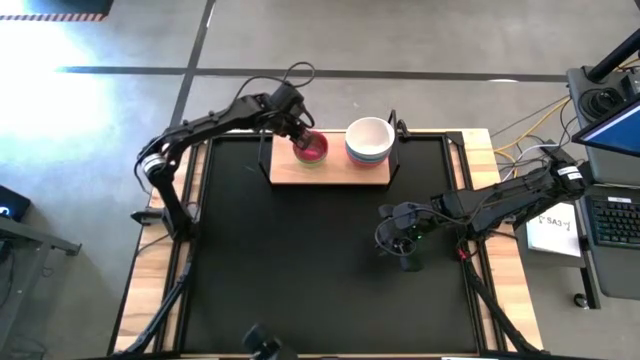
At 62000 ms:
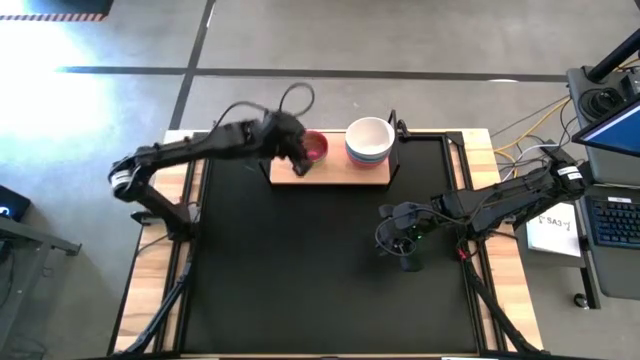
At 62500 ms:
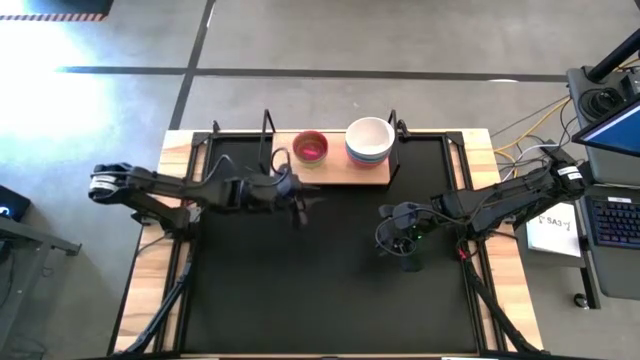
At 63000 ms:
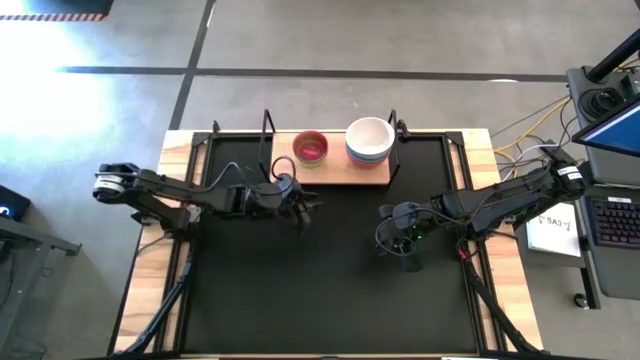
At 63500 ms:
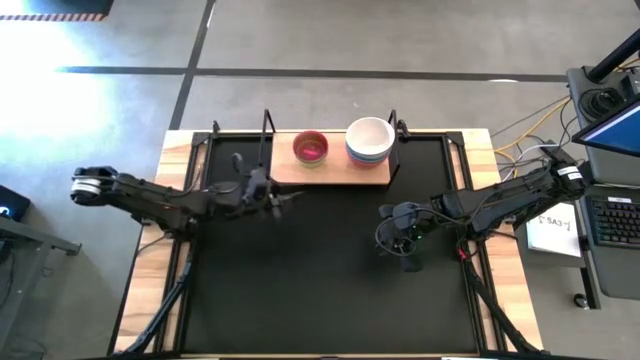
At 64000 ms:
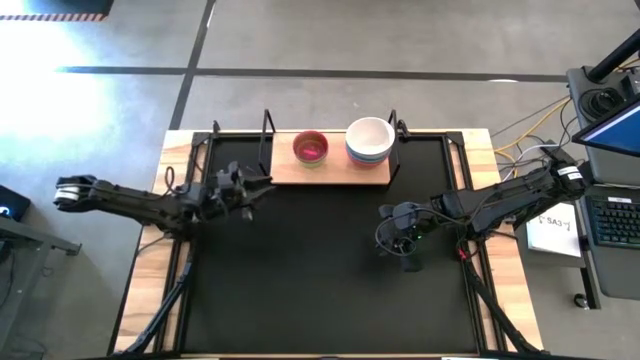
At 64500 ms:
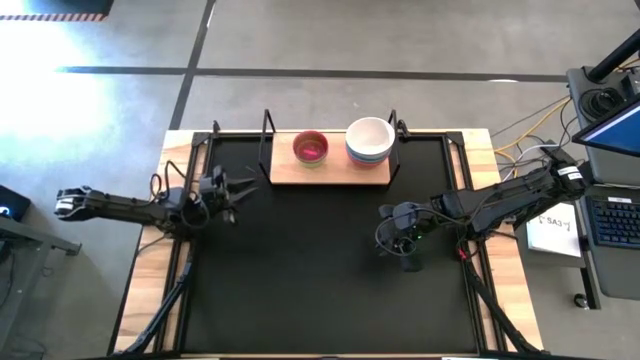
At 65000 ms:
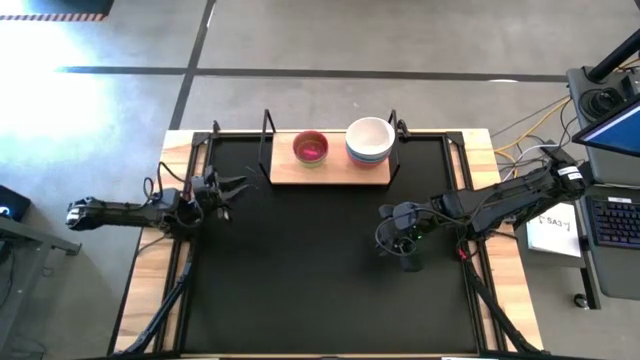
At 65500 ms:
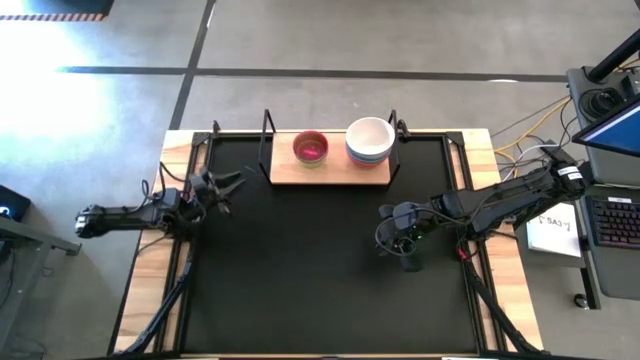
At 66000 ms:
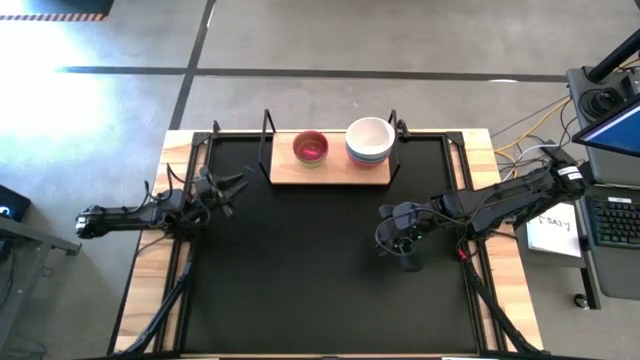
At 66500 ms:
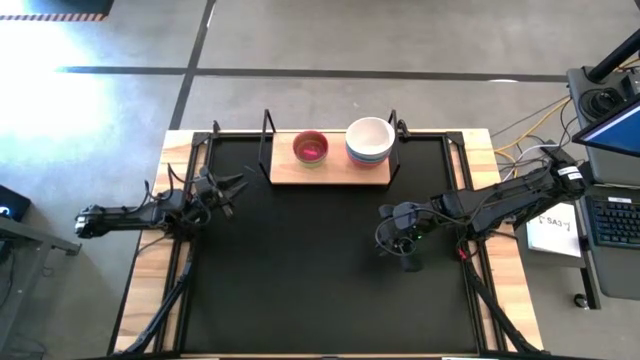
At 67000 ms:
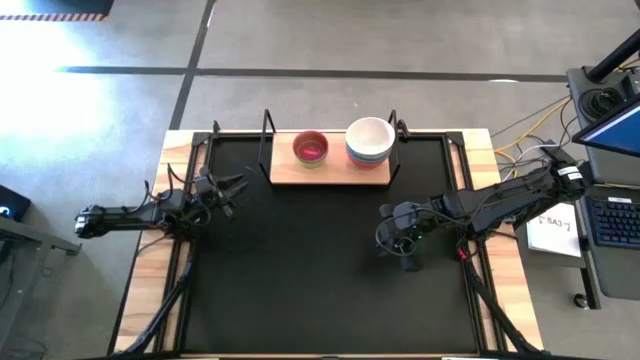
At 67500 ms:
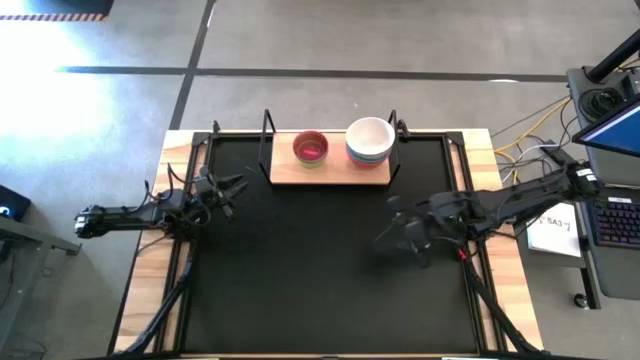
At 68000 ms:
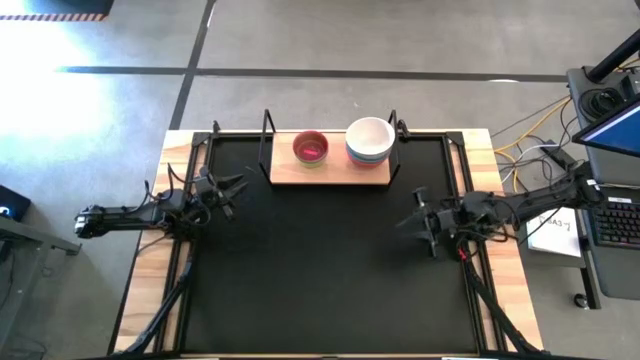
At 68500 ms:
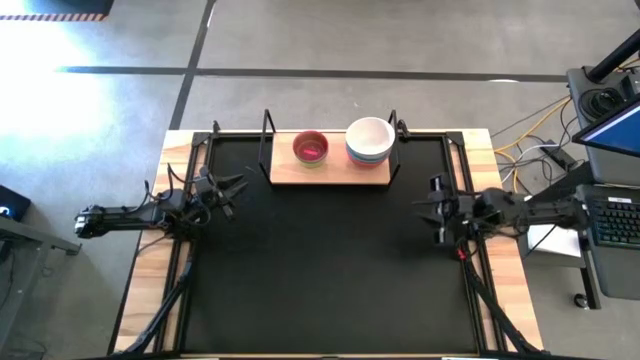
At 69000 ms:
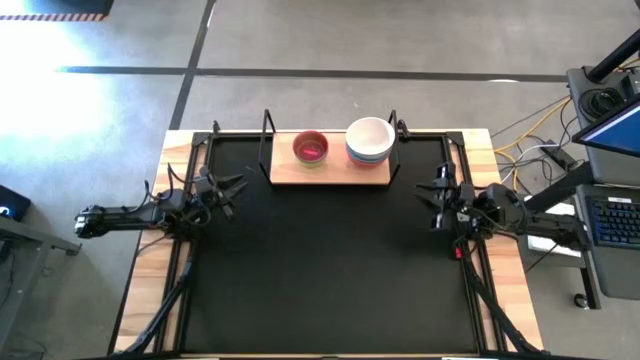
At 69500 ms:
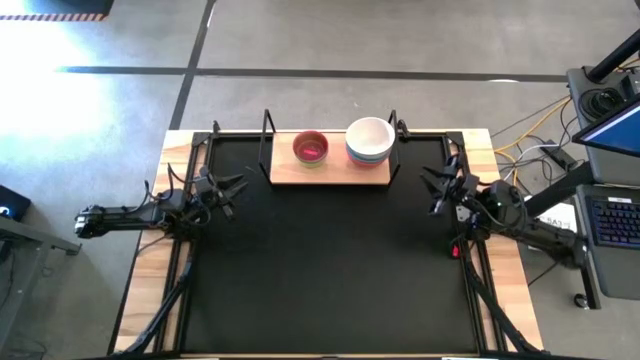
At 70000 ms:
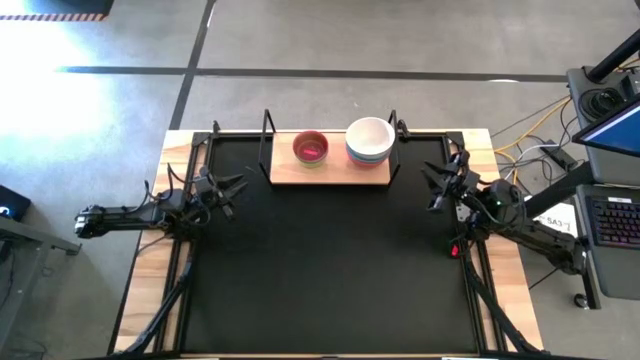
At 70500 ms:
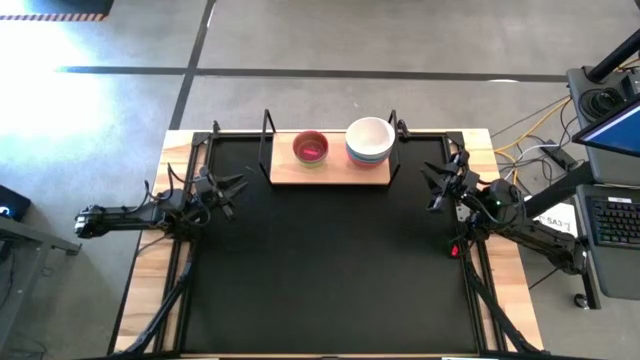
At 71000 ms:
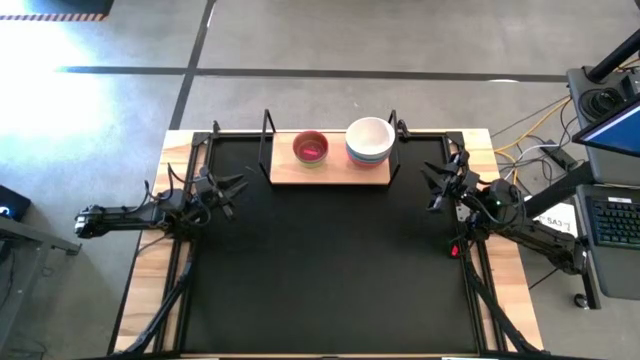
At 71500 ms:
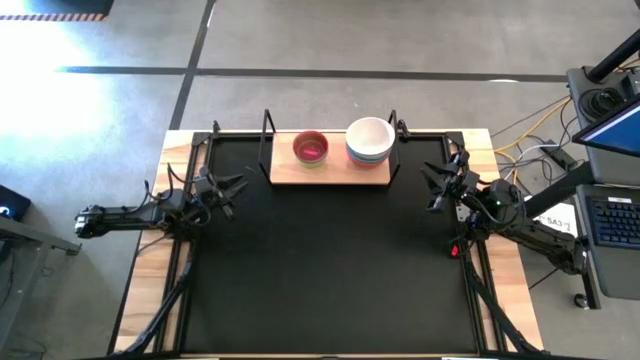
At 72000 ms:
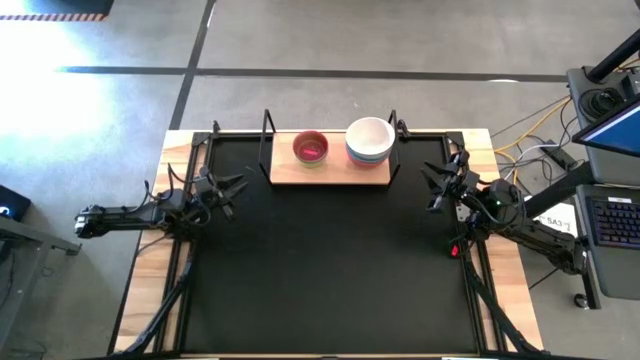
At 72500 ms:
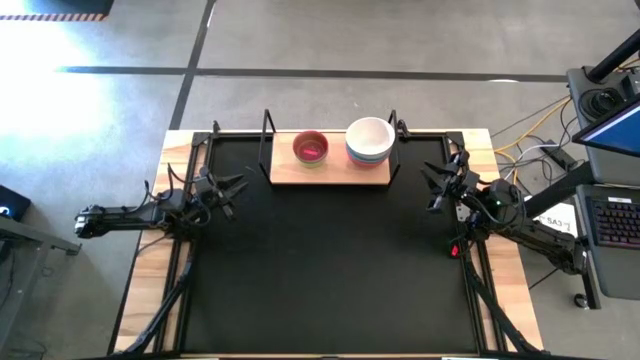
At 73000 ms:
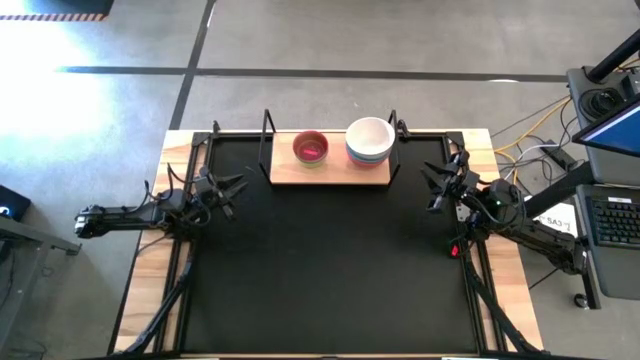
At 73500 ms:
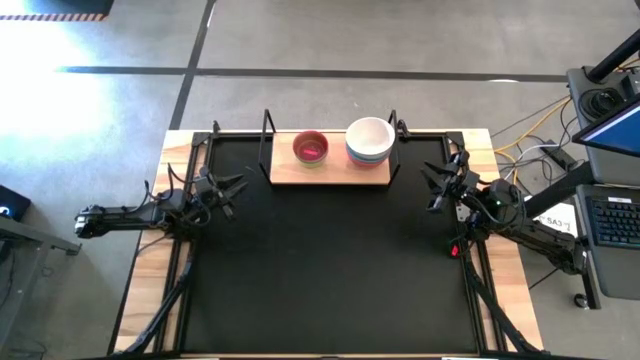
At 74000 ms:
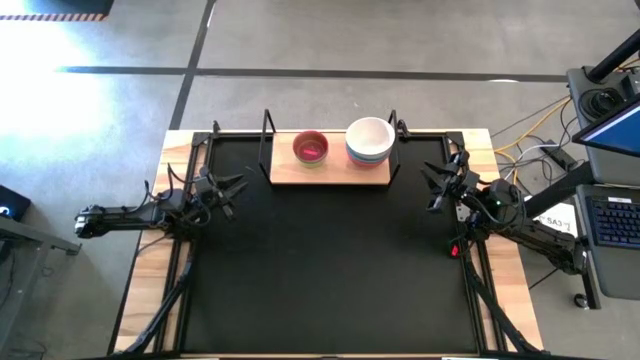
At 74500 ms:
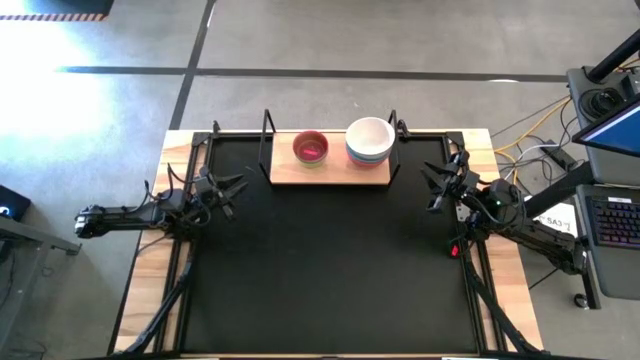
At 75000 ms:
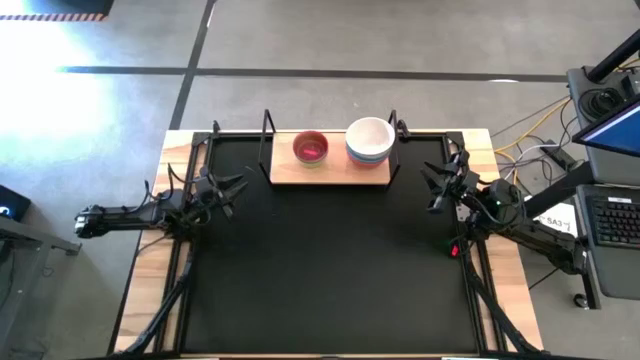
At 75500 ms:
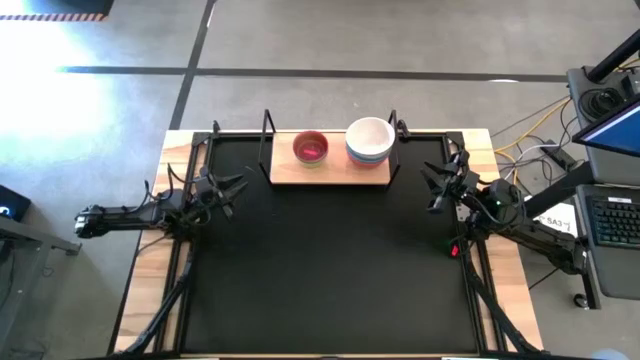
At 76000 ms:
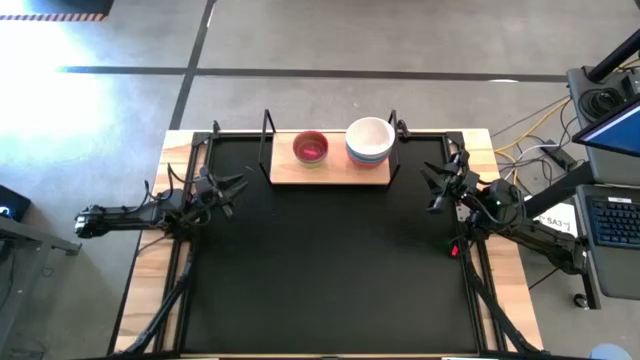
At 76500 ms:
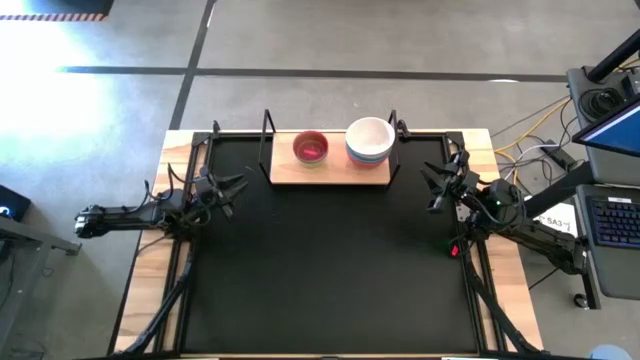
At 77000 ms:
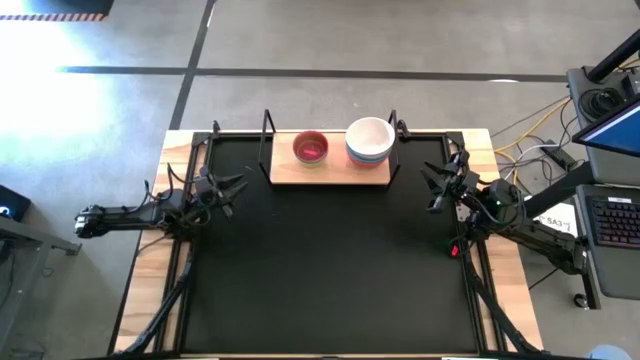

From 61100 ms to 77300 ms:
Task: Place and stack bowls onto a shelf
Return to Home Position

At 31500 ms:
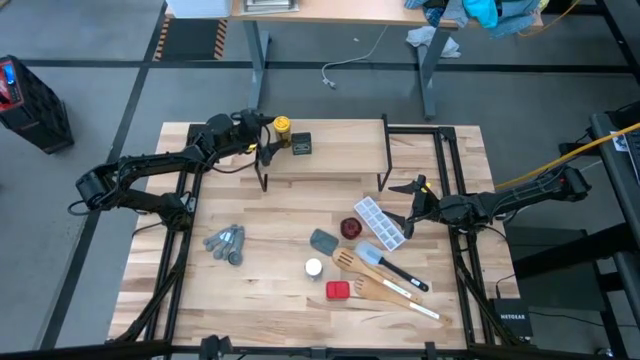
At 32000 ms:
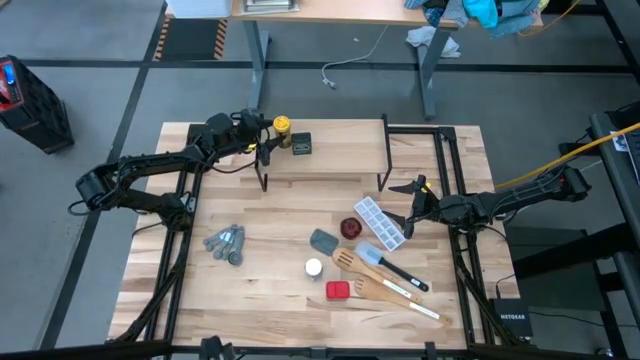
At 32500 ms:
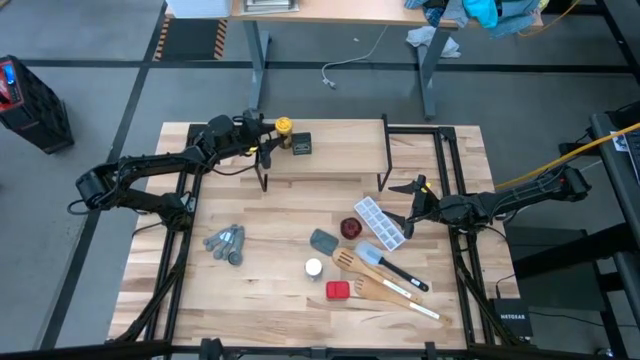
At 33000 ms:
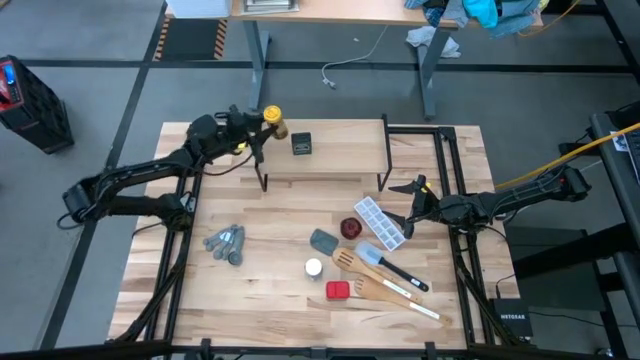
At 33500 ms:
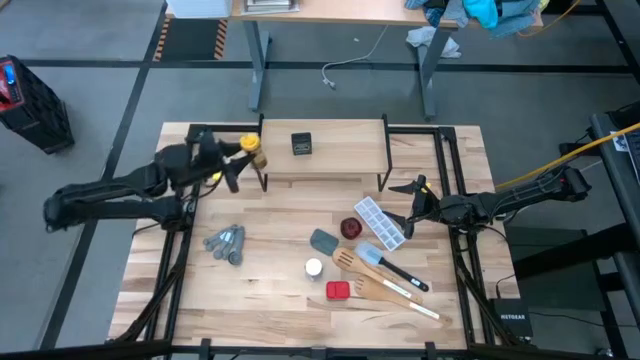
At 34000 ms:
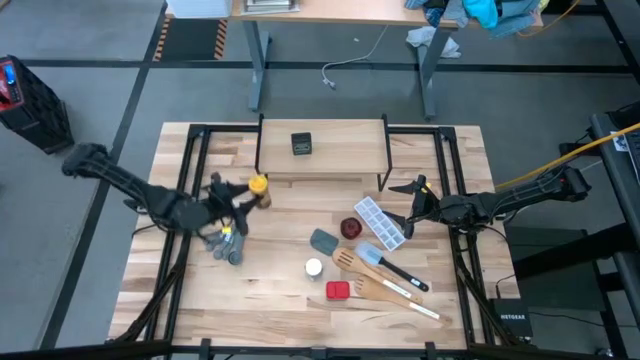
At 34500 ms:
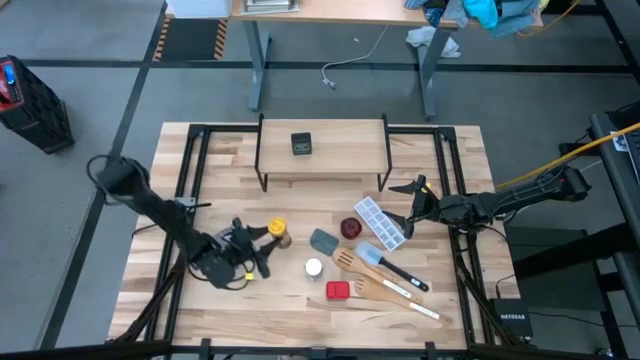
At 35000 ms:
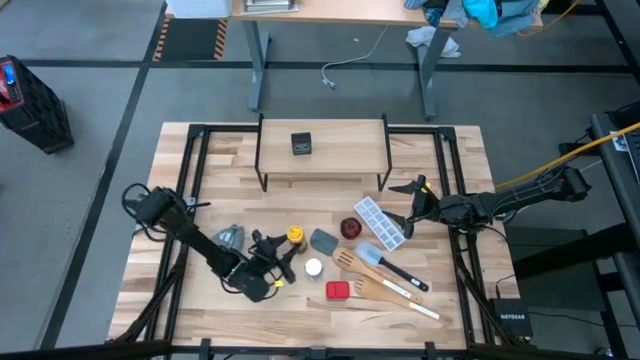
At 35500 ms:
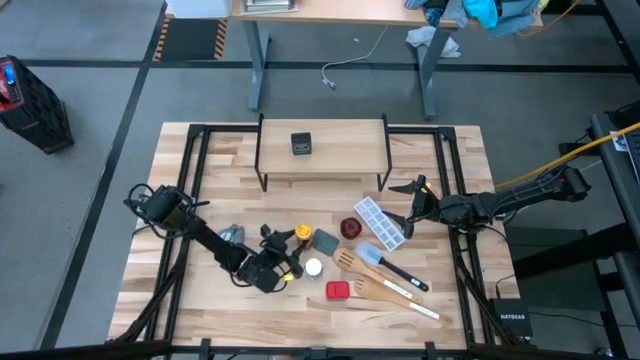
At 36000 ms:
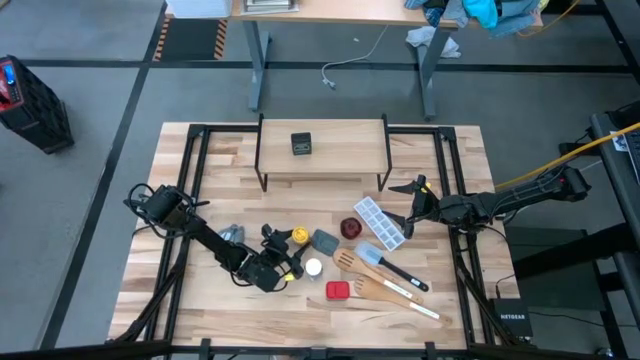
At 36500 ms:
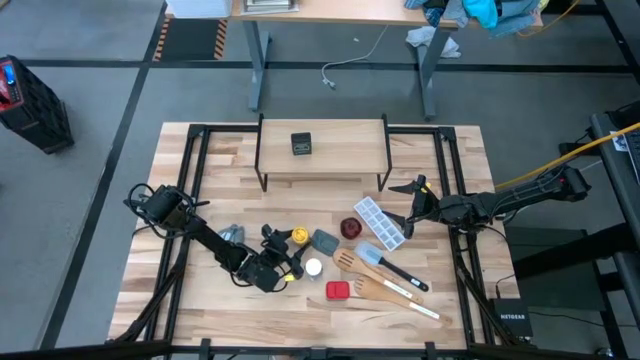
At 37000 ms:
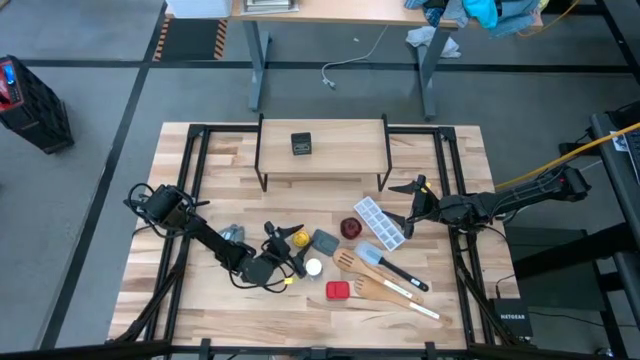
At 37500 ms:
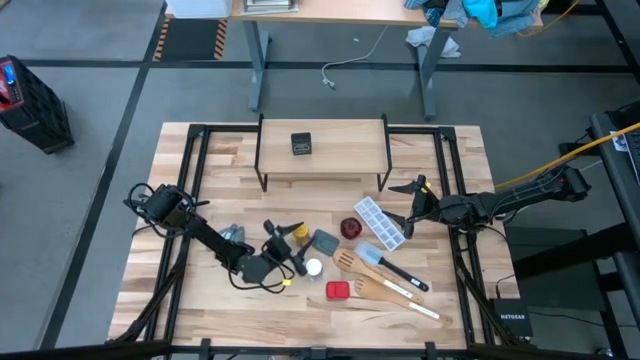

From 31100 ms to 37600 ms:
Task: Shelf spices
Remove the yellow seasoning bottle from the shelf
